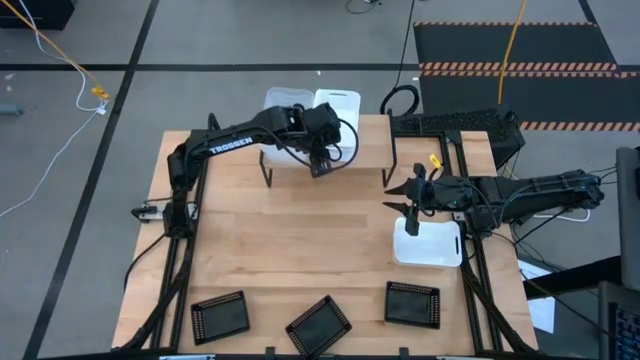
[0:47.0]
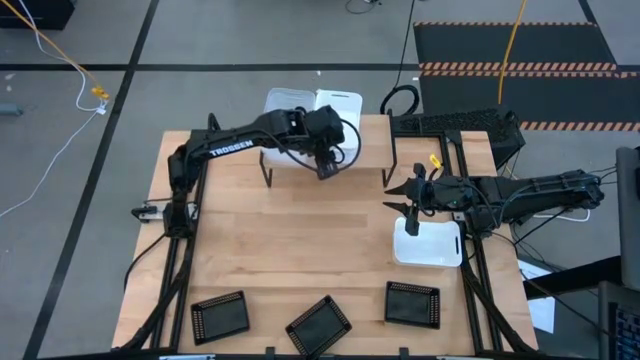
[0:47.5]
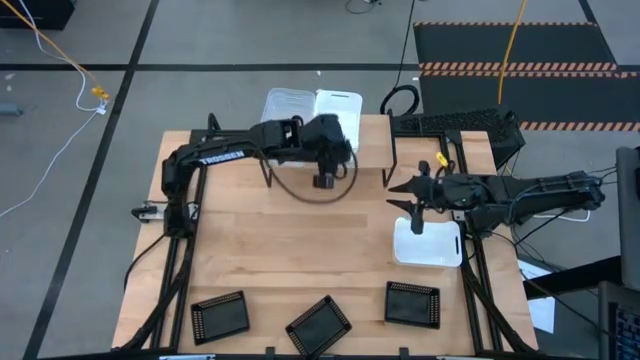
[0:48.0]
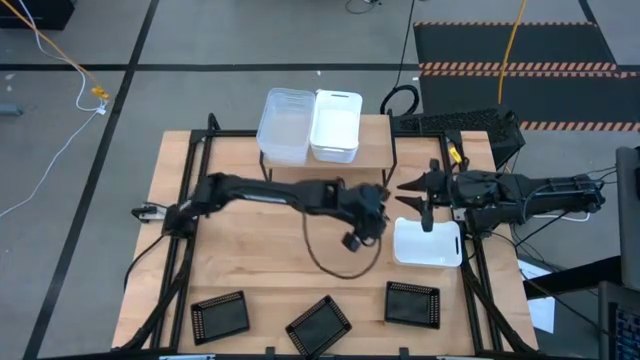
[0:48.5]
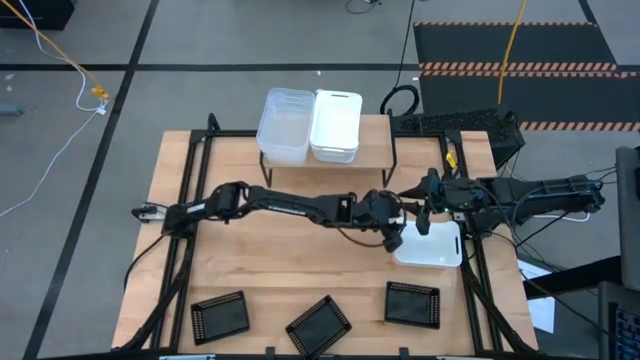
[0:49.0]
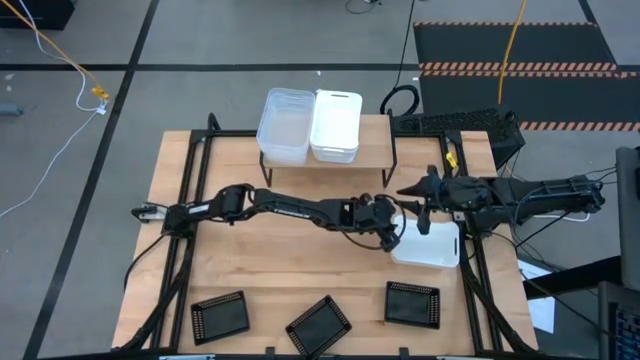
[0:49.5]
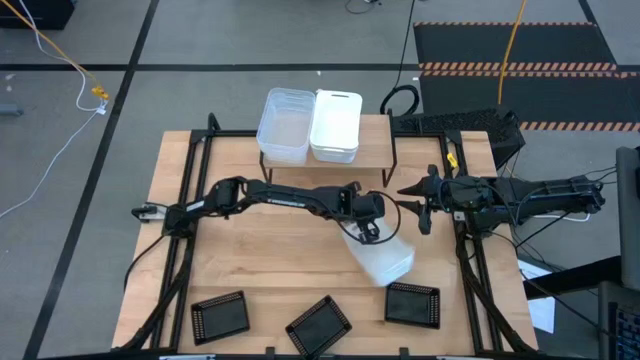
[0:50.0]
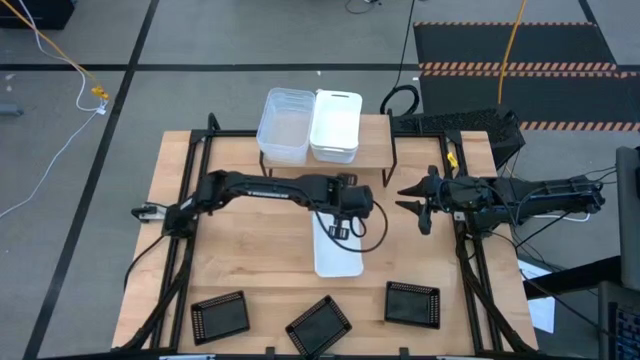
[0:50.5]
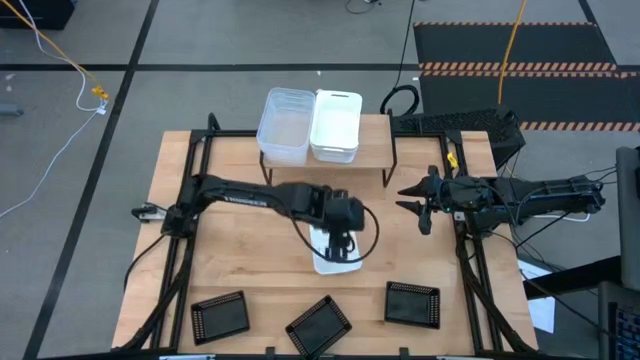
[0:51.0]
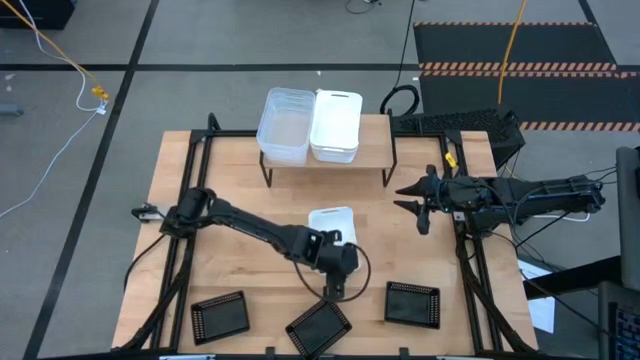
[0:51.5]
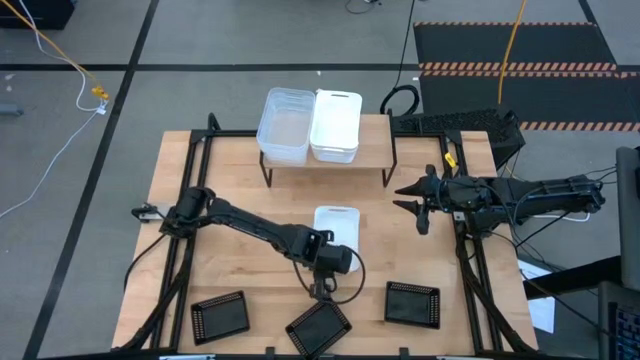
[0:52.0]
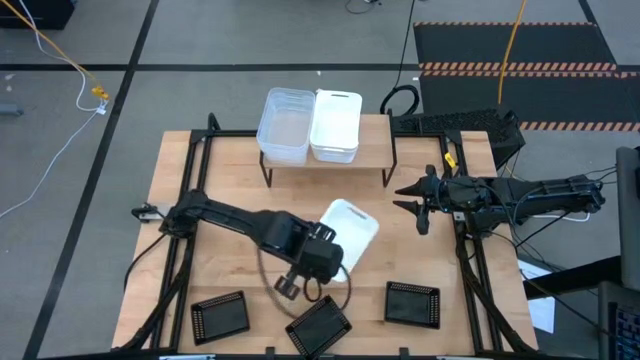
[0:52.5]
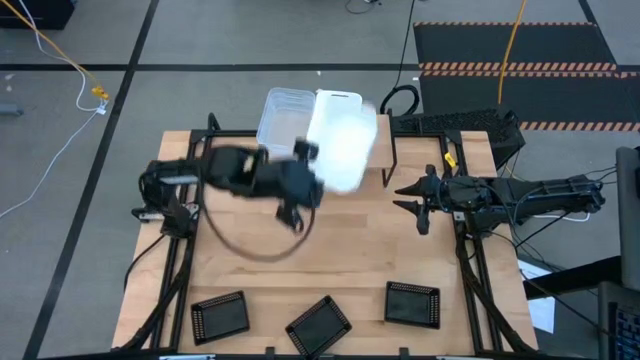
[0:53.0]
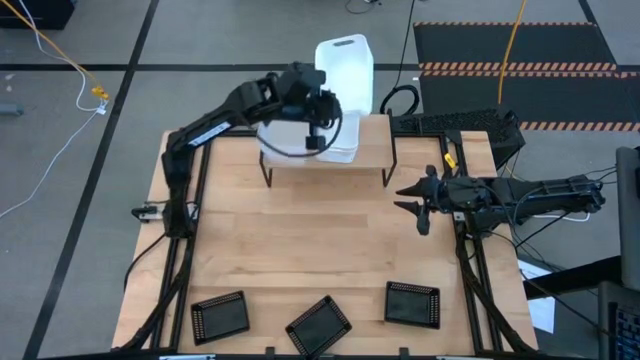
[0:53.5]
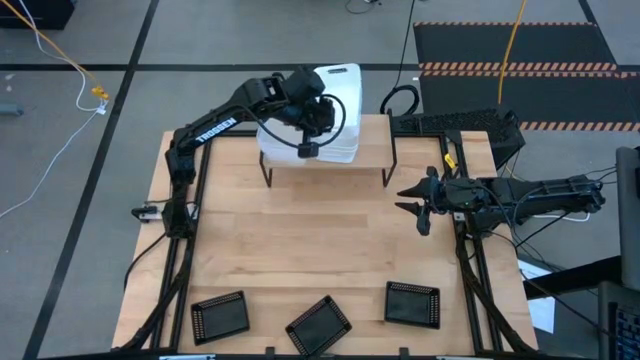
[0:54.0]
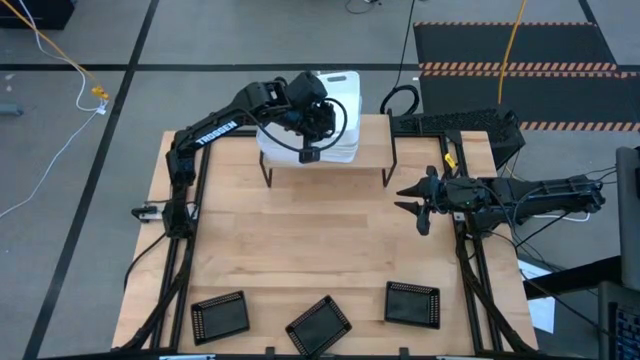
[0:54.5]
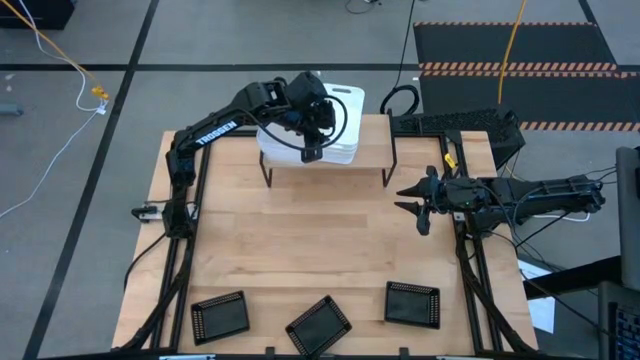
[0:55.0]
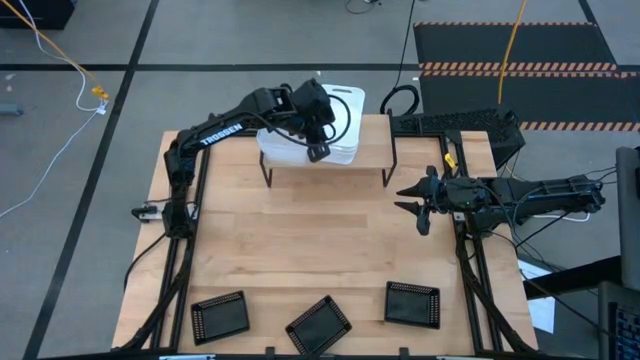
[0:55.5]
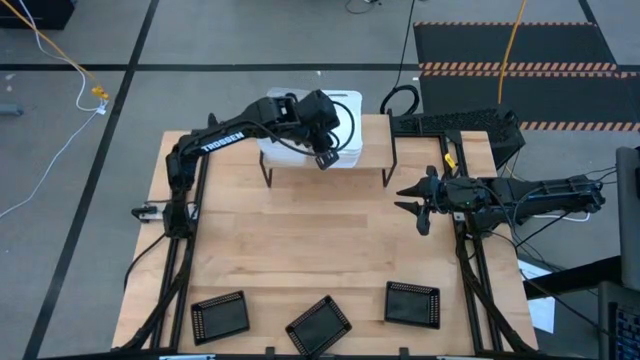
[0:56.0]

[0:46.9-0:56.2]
Task: Stack baskets on shelf by color
Stack the white bin on the white bins on the shelf

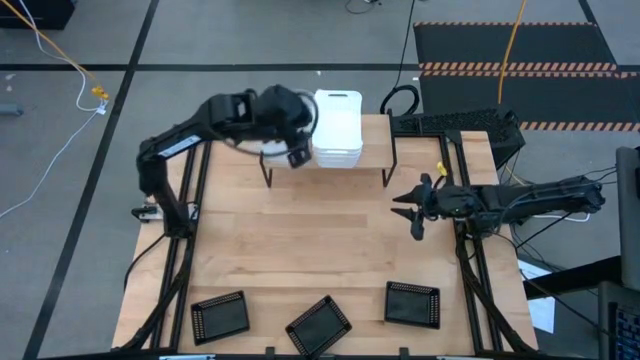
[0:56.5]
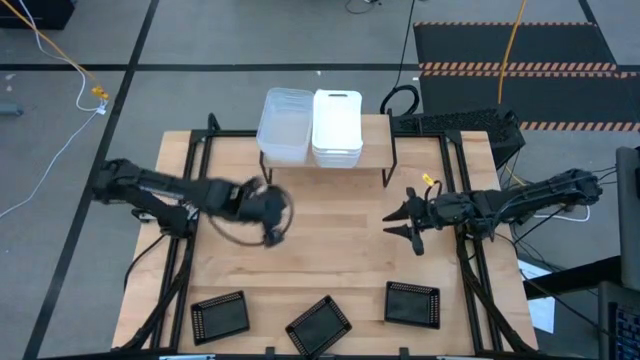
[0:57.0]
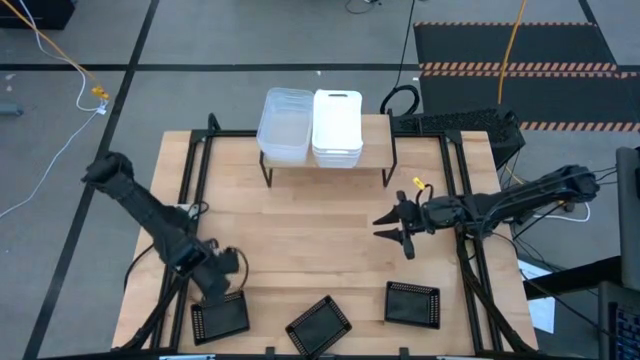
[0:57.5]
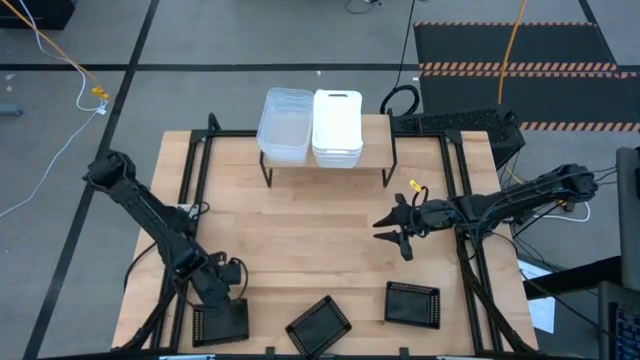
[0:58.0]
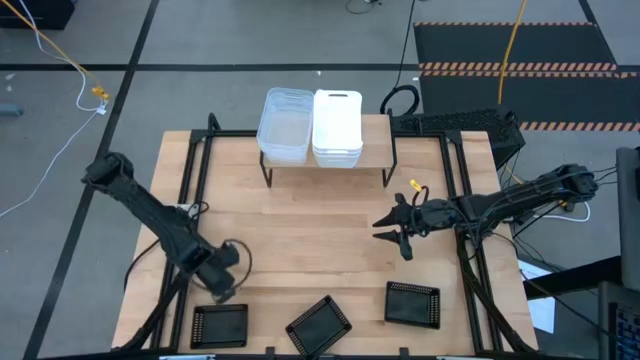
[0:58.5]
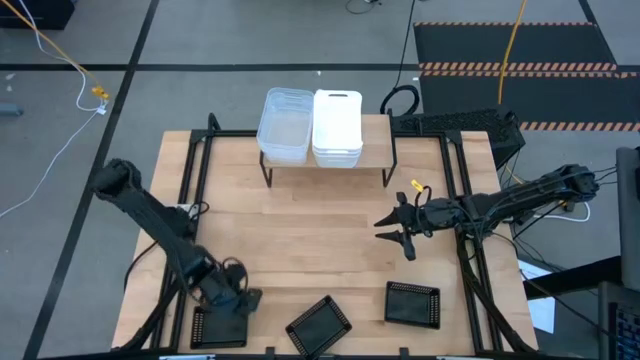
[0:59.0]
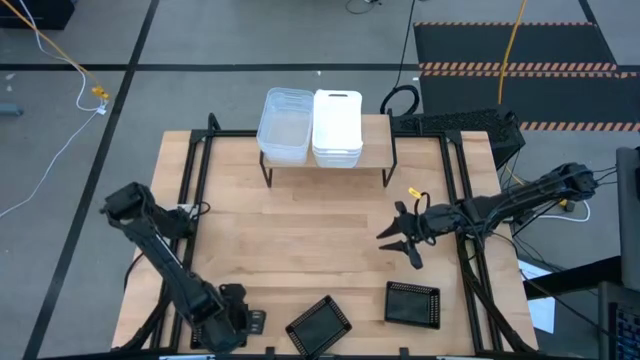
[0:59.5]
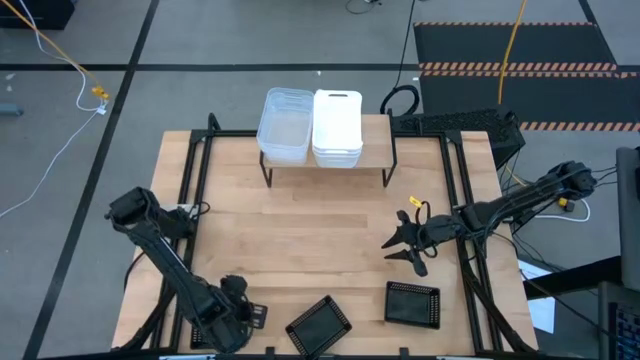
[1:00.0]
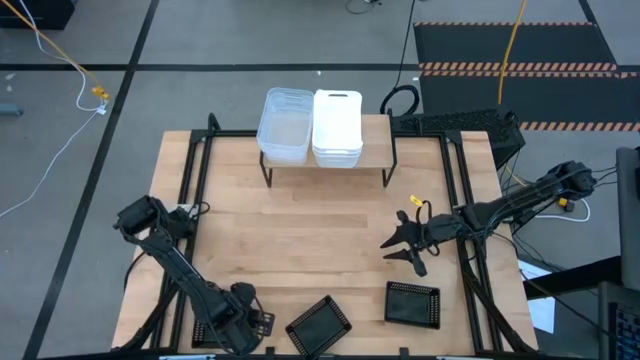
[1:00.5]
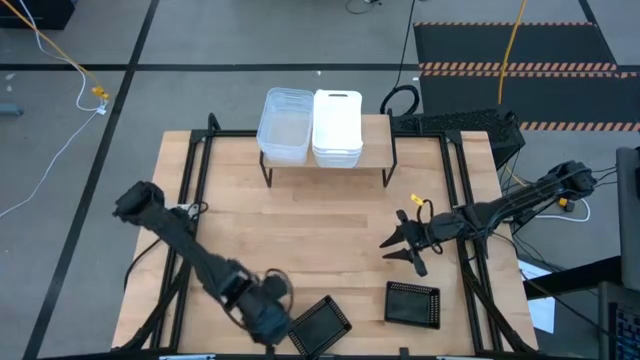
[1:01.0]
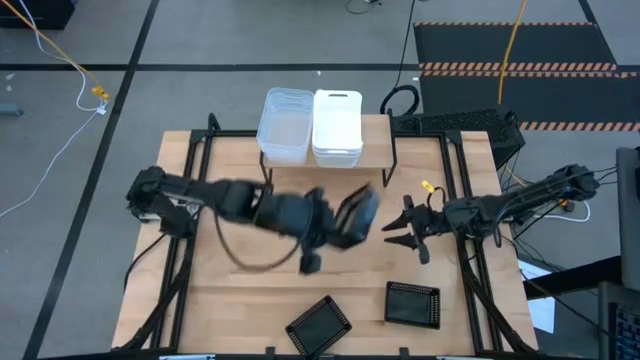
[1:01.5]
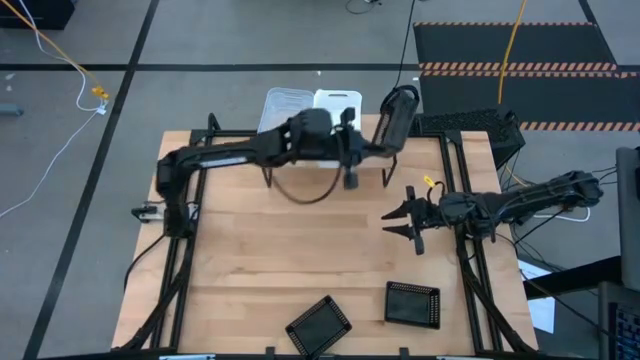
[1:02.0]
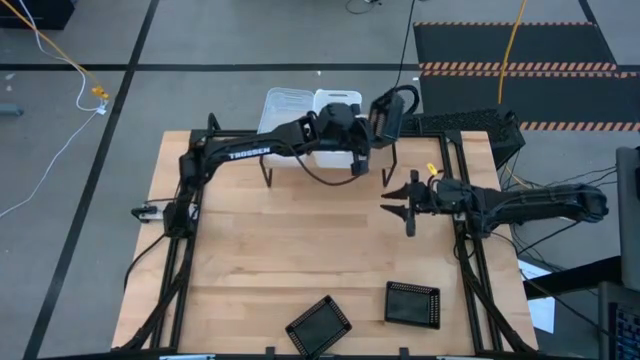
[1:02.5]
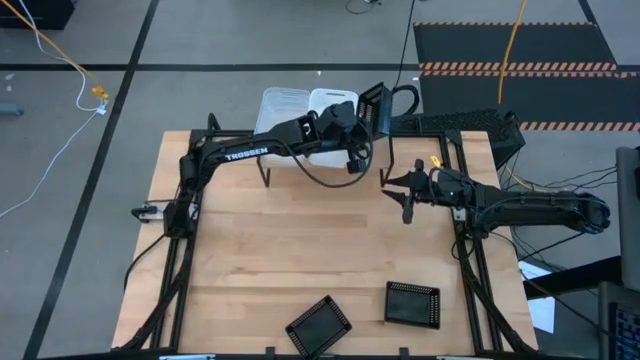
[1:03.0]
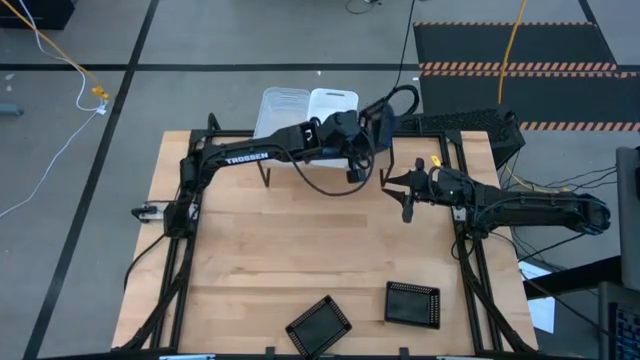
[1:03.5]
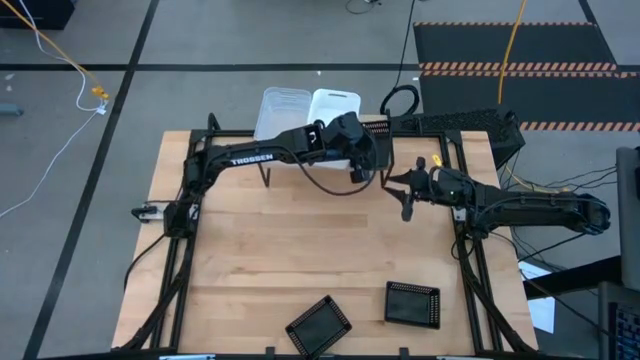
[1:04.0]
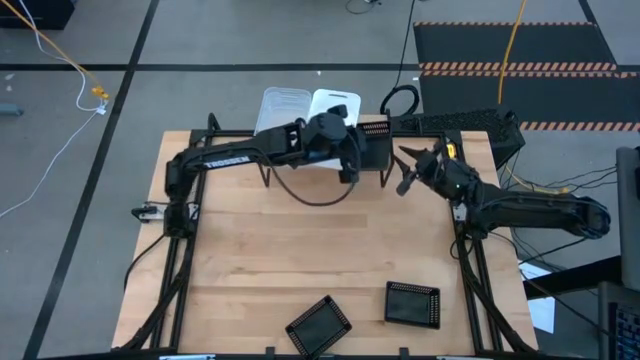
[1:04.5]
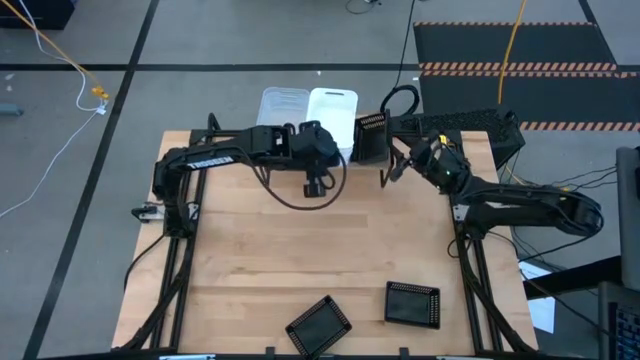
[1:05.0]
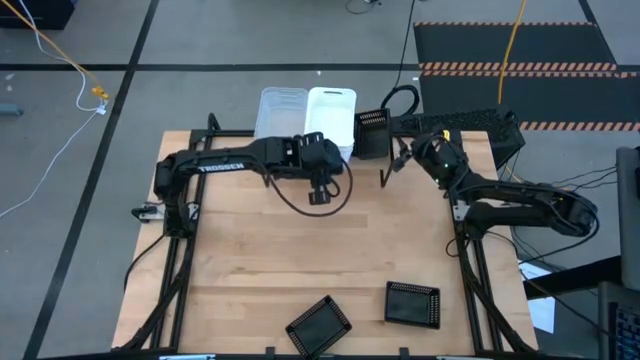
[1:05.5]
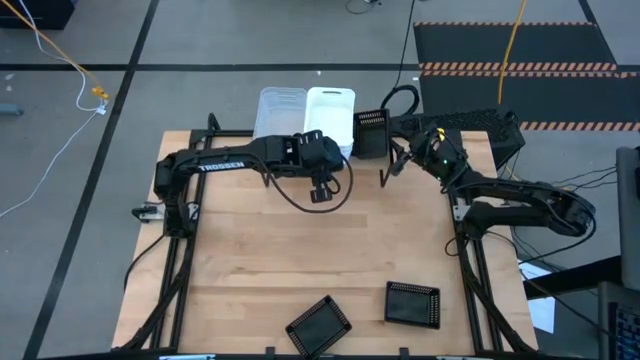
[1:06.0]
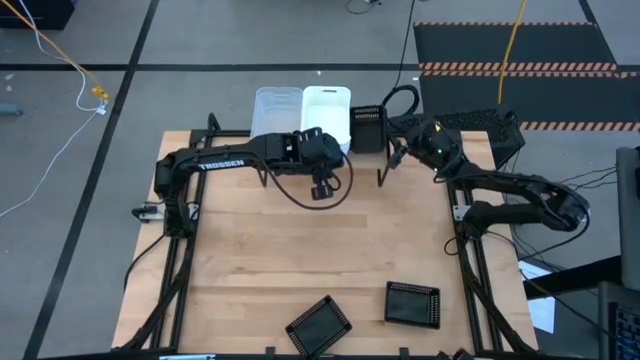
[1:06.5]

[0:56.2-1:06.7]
Put the left black bin on the shelf

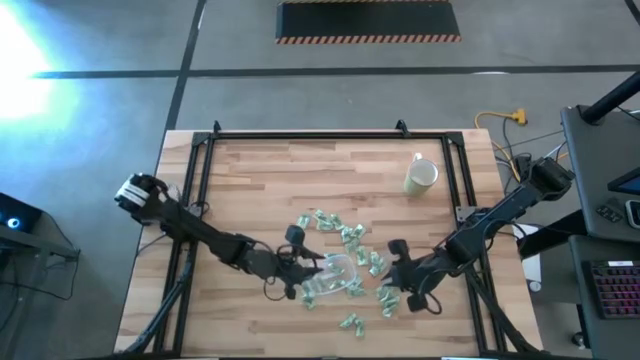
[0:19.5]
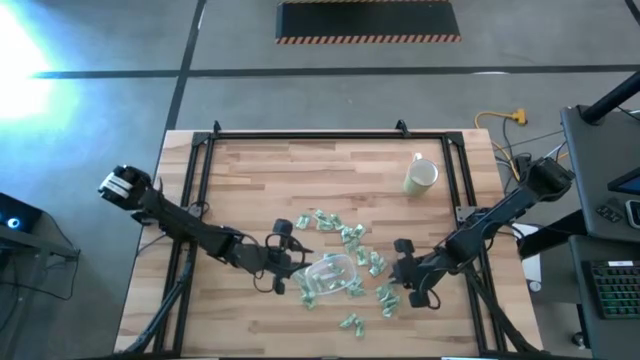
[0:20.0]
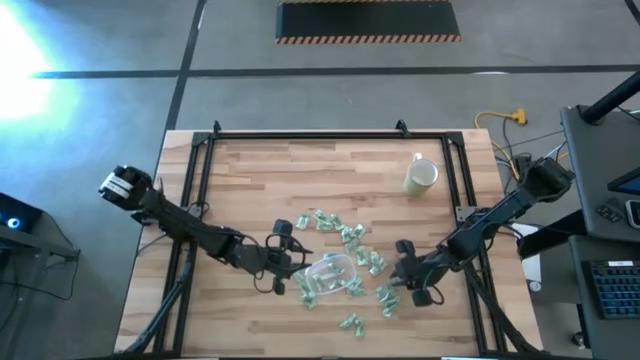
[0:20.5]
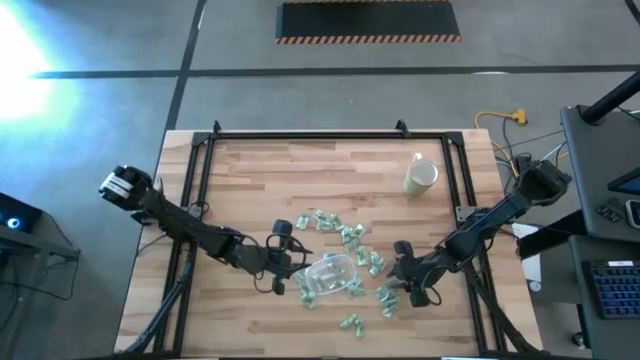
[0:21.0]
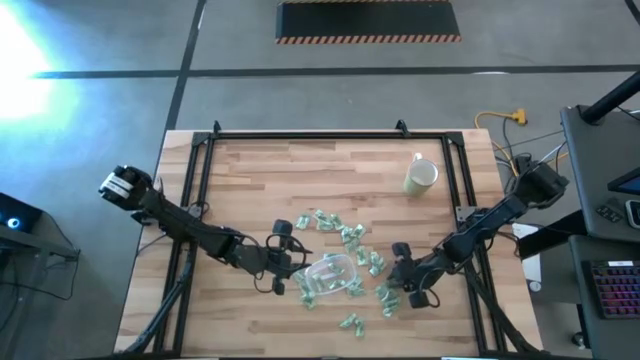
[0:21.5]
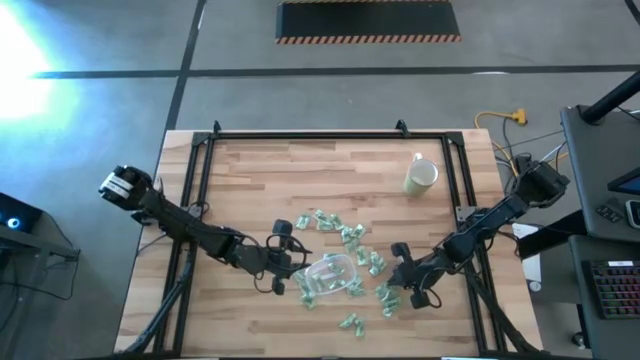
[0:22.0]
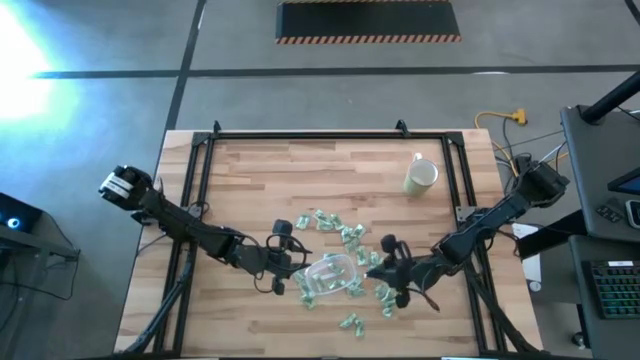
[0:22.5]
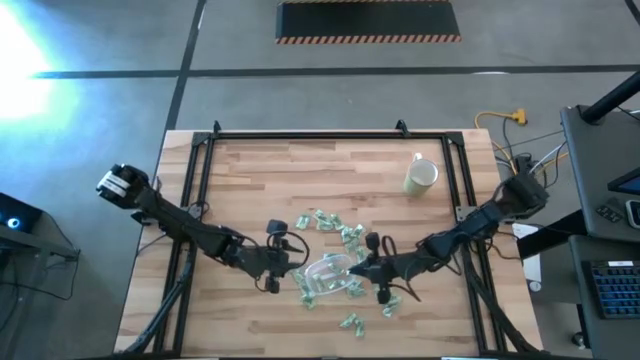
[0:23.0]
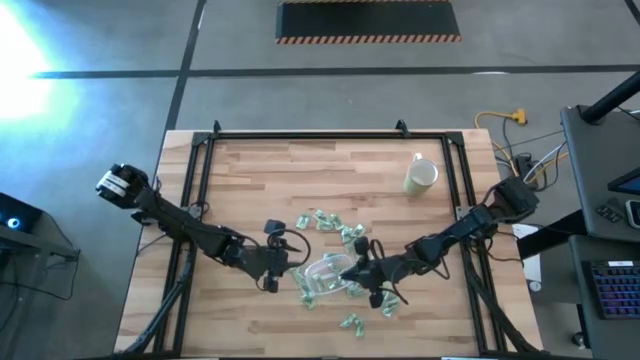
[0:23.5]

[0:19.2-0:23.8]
Task: Pick and place items into bin
Put the Stevia packet into the transparent bin
